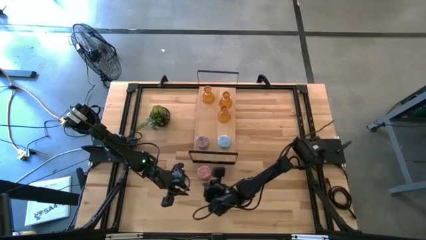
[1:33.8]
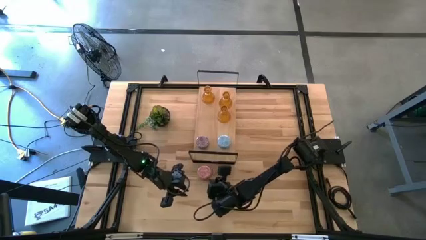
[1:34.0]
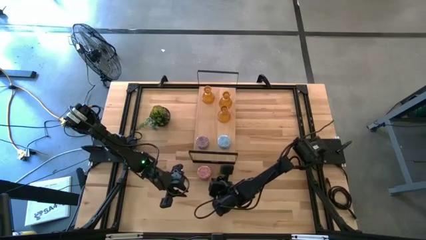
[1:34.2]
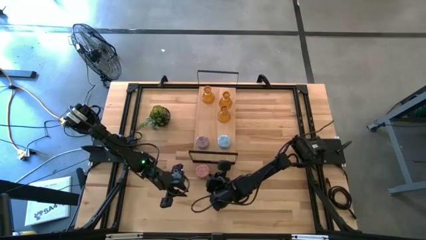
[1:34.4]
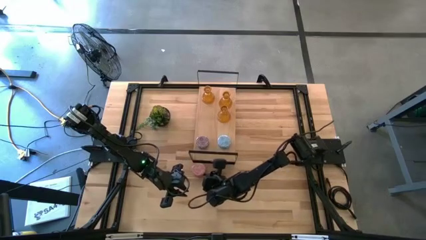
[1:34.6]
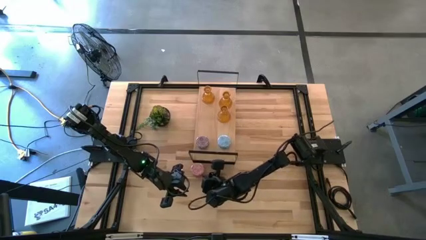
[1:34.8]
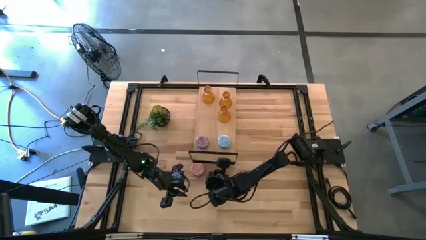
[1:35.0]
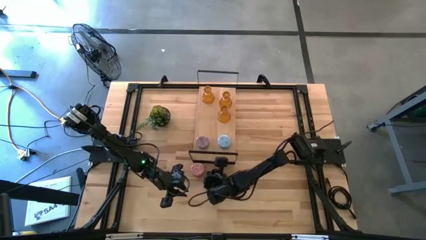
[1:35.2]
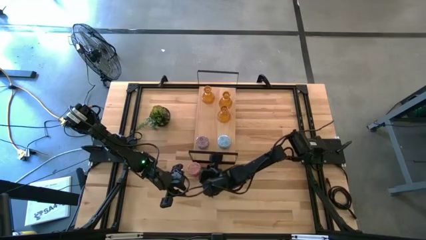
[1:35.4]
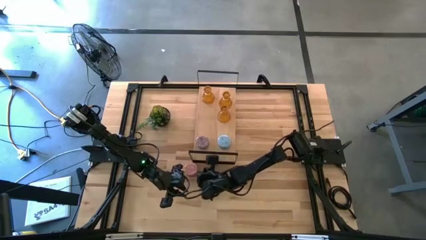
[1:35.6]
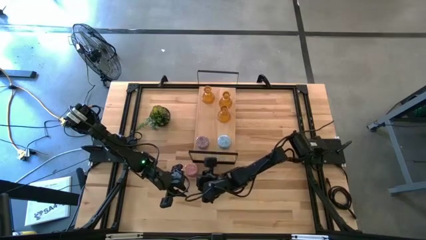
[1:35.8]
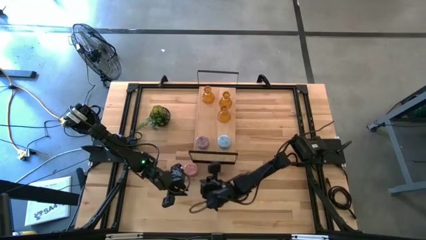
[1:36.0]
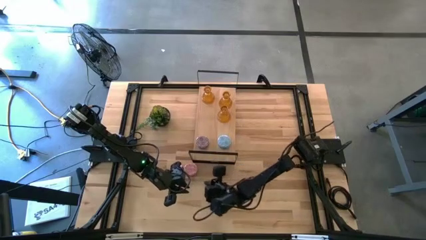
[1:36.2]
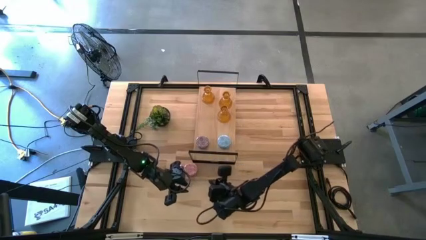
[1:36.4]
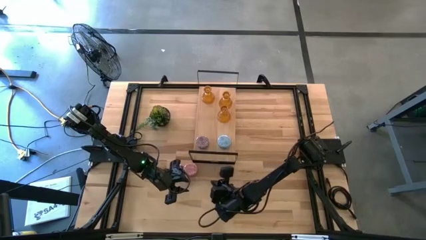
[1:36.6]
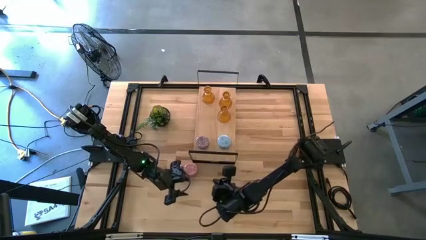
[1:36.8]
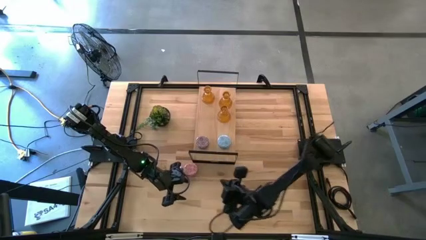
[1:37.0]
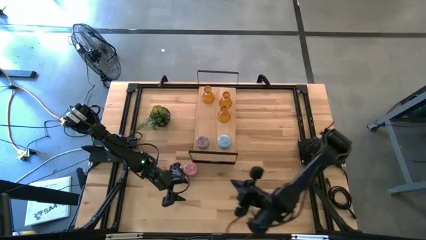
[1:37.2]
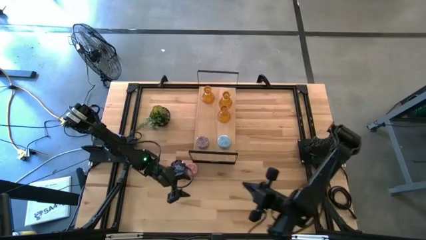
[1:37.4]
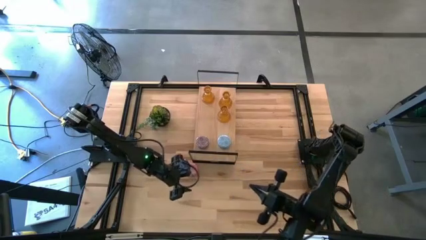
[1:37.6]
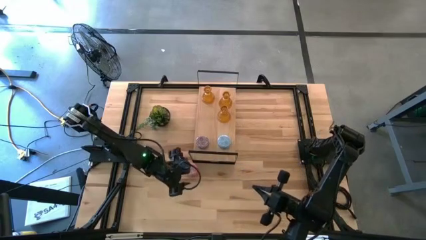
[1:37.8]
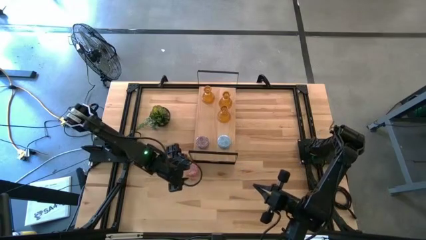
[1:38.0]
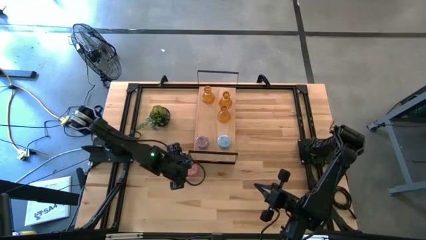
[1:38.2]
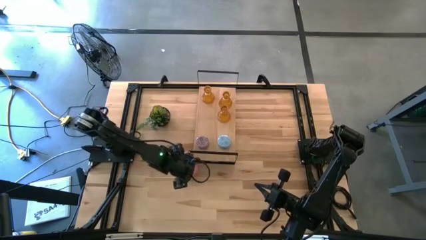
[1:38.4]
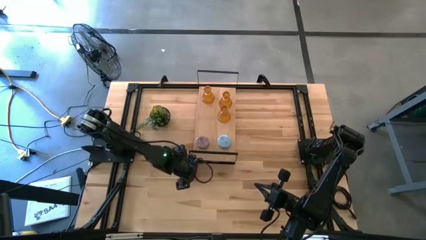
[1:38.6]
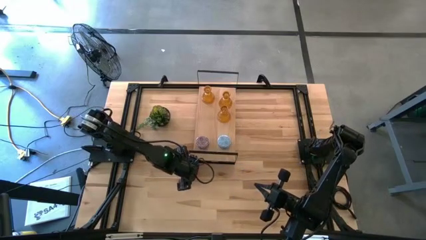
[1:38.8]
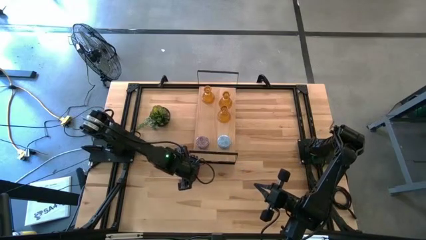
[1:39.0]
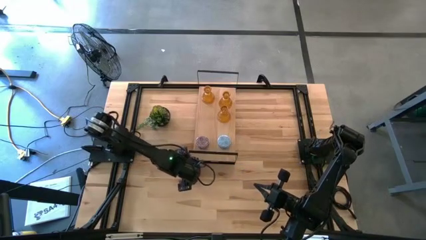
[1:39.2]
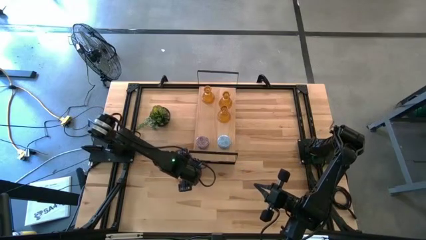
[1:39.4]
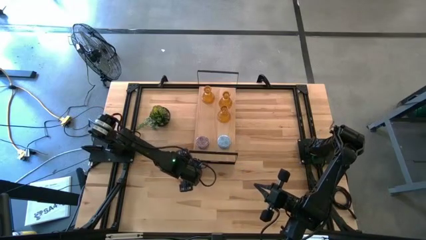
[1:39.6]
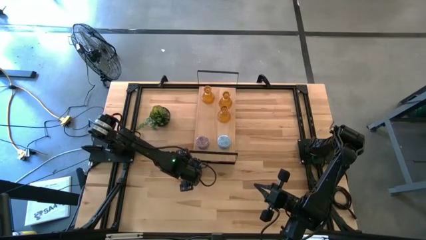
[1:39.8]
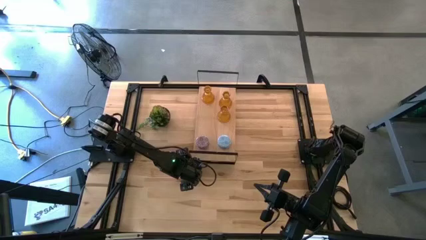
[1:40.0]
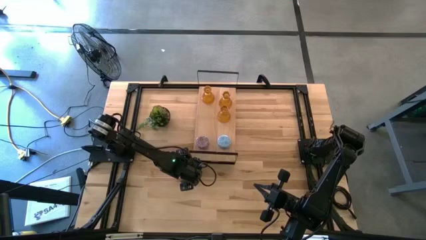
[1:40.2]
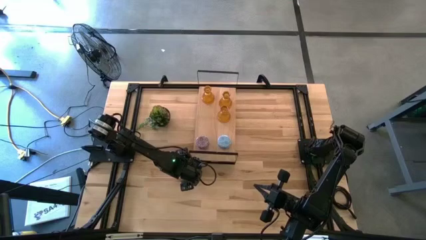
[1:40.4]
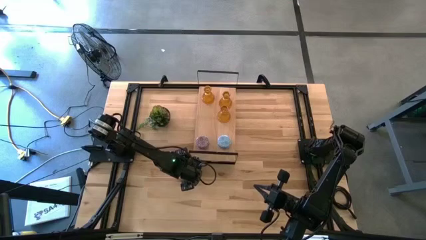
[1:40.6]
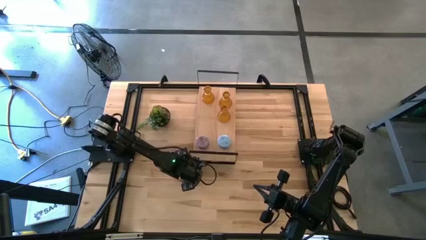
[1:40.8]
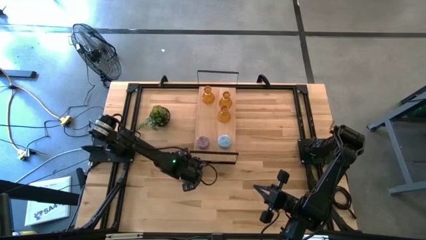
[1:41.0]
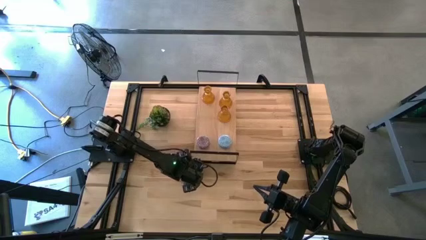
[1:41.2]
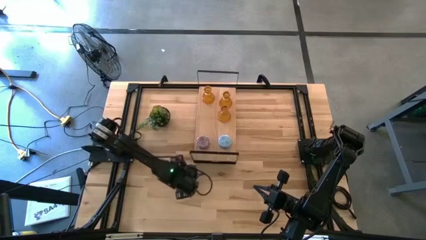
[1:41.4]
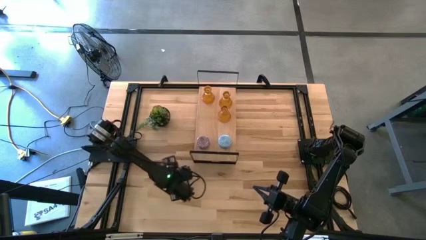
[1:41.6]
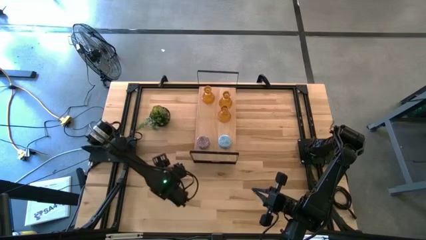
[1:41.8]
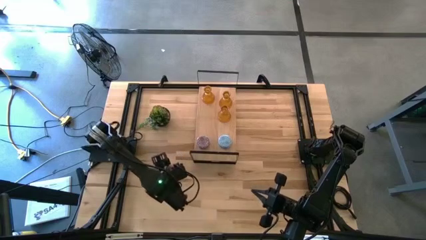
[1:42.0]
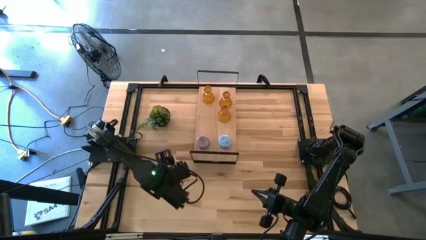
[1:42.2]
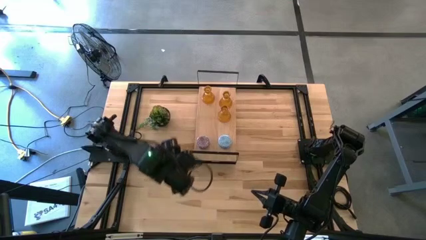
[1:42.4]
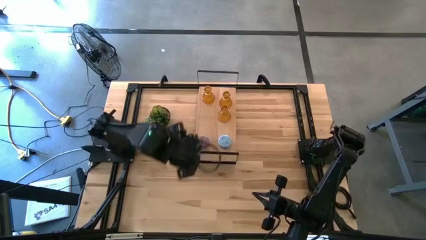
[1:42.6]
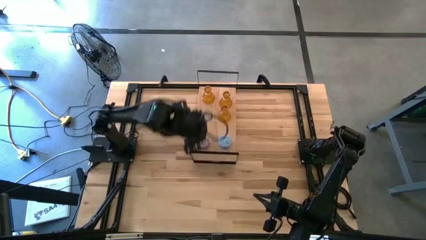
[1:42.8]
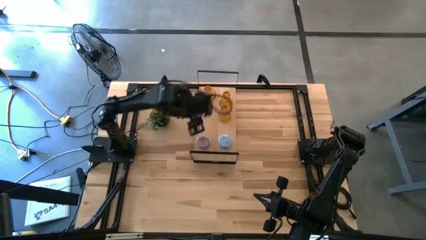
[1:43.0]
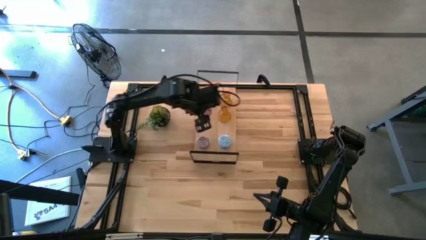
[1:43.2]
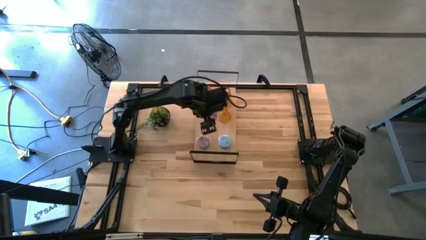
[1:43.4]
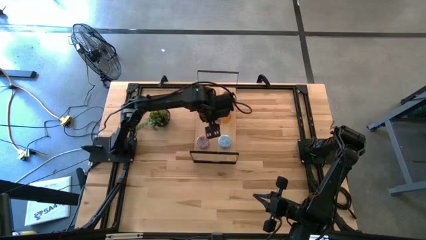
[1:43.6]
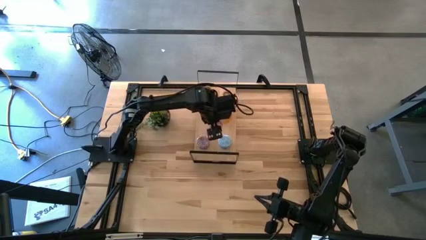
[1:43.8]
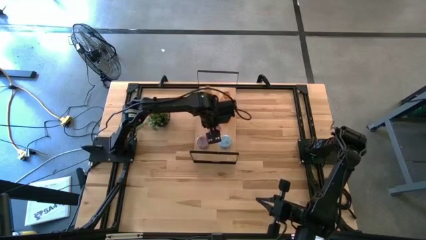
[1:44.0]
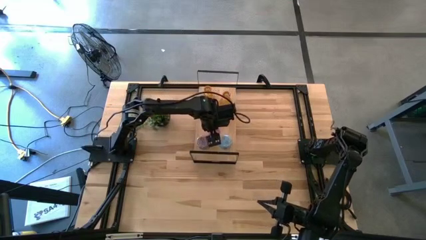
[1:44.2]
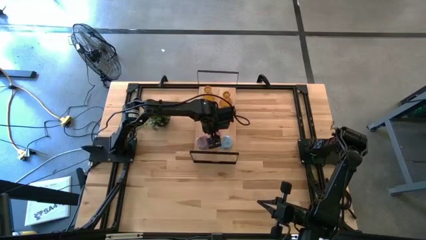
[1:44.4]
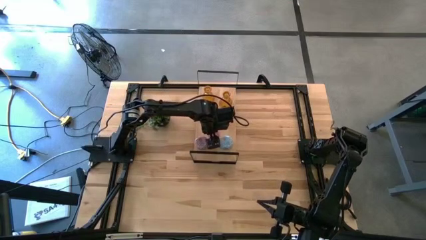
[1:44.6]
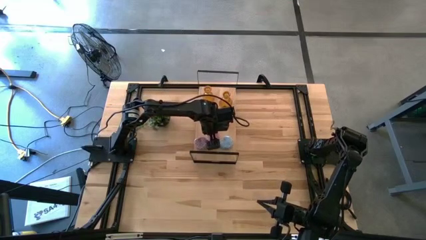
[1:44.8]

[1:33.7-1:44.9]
Task: Pick & Place candle stick holders
Put the pink scented candle on the shelf

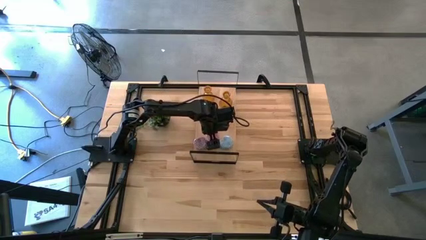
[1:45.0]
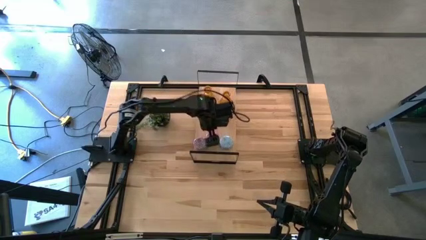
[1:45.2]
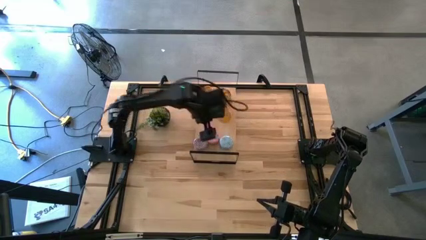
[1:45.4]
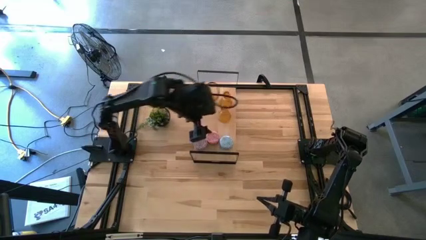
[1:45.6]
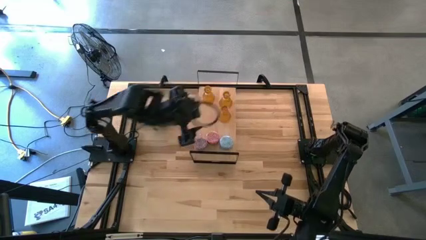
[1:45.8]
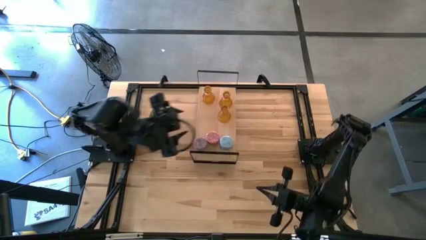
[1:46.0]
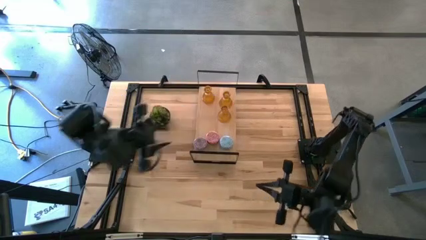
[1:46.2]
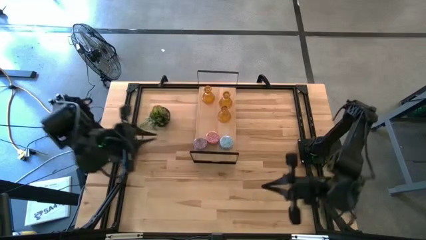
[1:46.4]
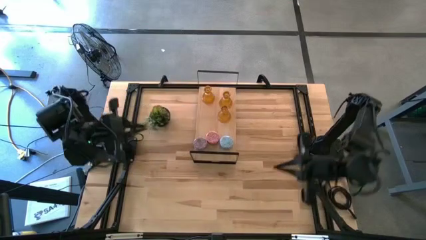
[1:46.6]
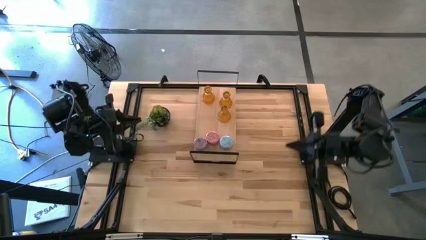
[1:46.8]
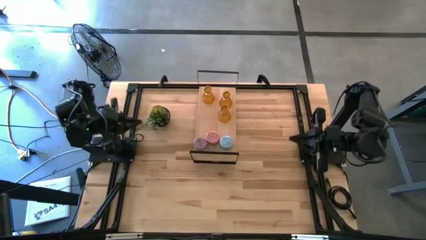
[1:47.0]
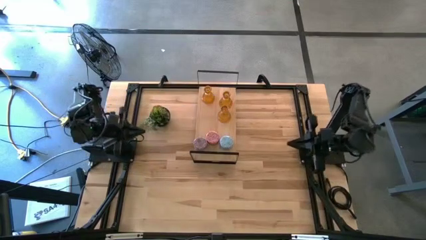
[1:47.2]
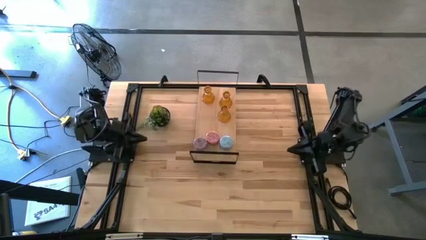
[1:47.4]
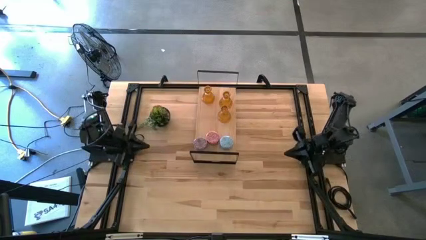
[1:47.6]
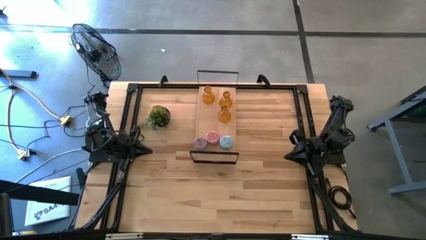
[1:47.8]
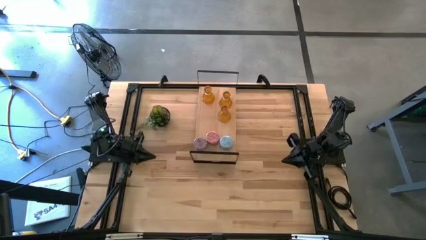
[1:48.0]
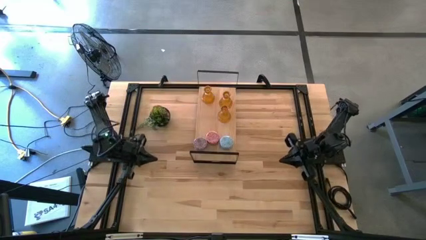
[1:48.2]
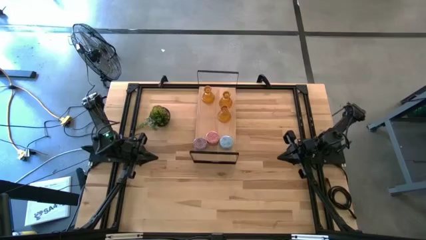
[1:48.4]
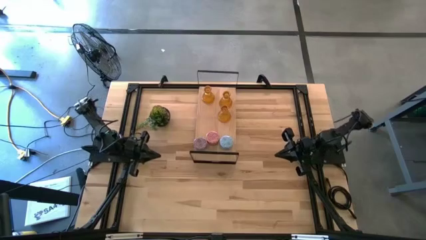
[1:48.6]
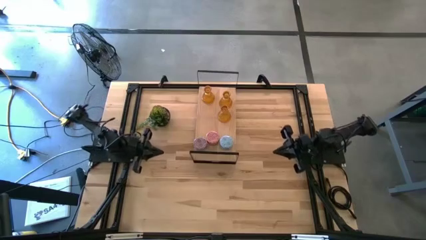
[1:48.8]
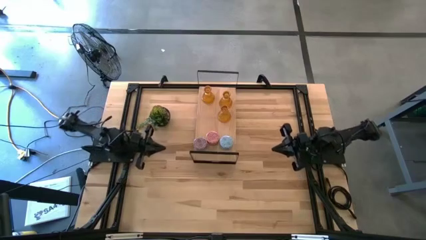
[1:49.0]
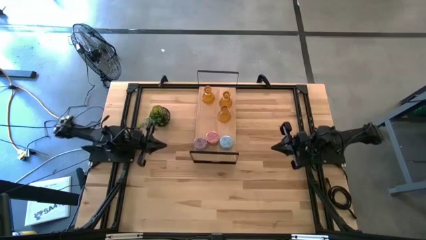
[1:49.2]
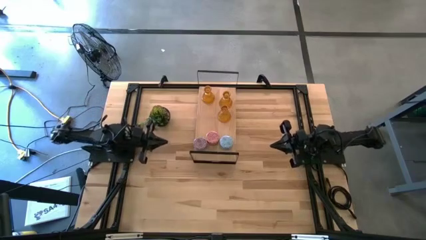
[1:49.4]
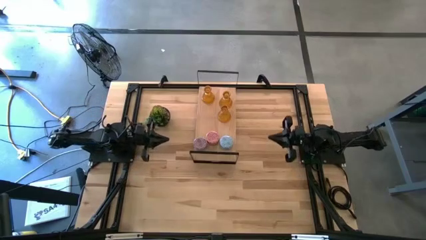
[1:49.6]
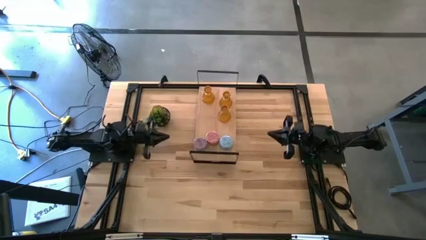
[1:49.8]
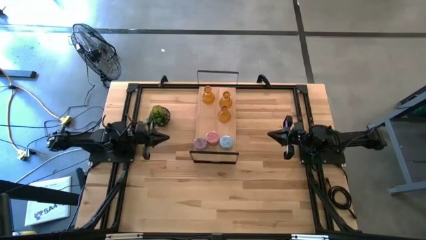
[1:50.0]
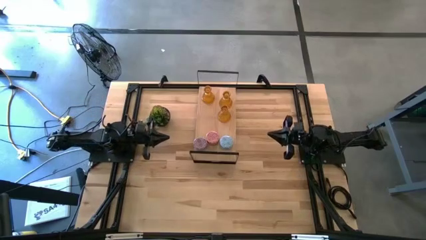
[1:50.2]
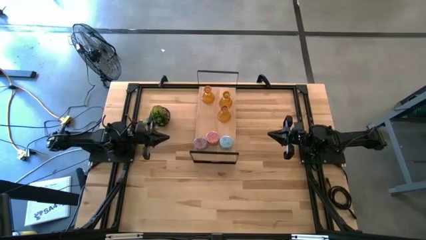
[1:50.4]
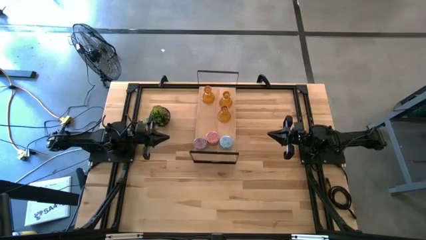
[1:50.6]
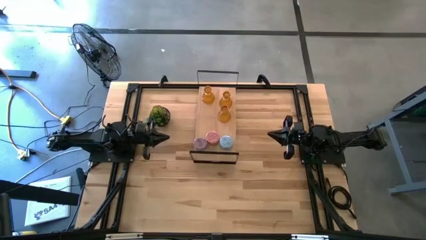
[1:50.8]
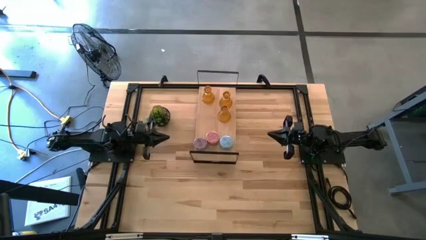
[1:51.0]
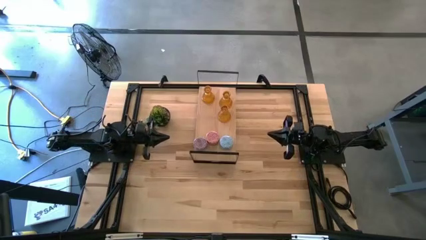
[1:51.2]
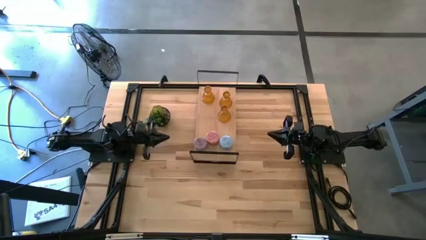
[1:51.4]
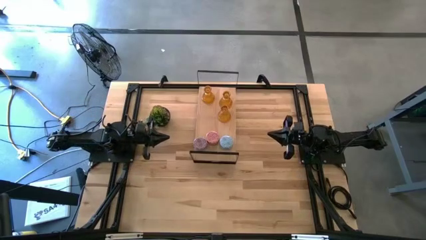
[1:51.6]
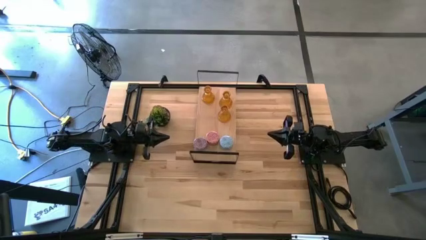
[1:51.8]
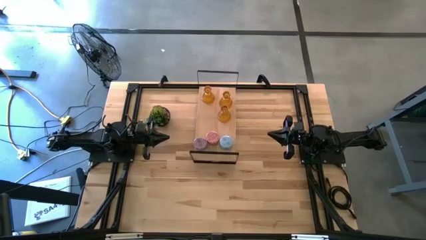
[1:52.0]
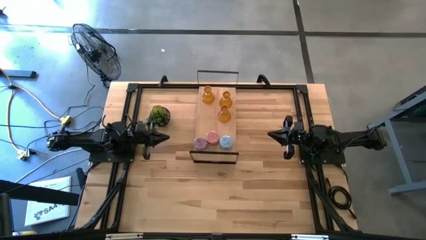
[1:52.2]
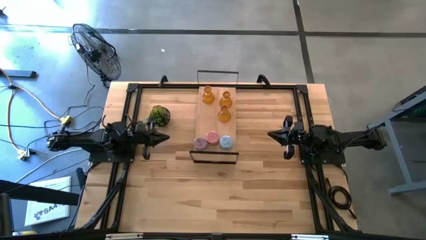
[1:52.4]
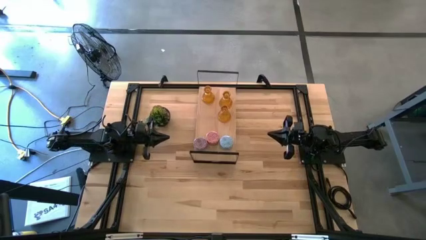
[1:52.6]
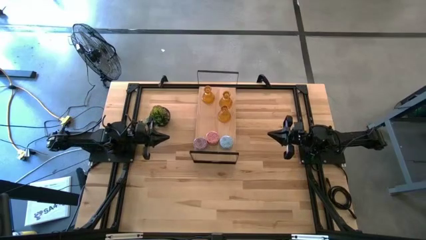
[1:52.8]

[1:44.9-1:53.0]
Return to Home Position
